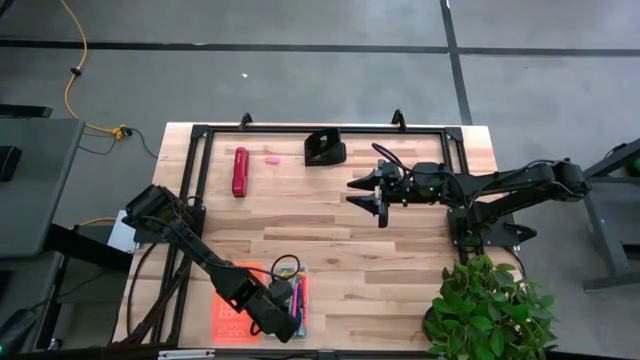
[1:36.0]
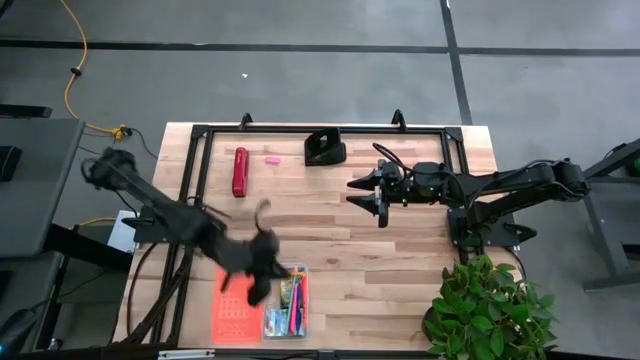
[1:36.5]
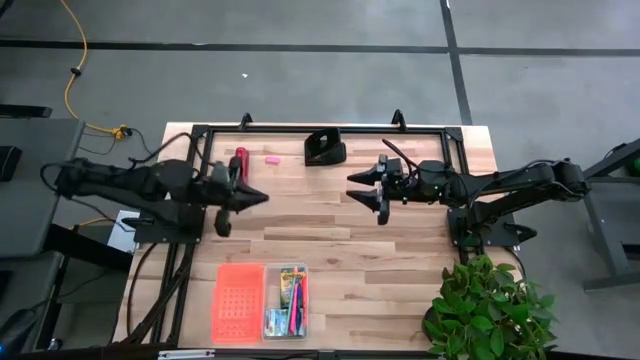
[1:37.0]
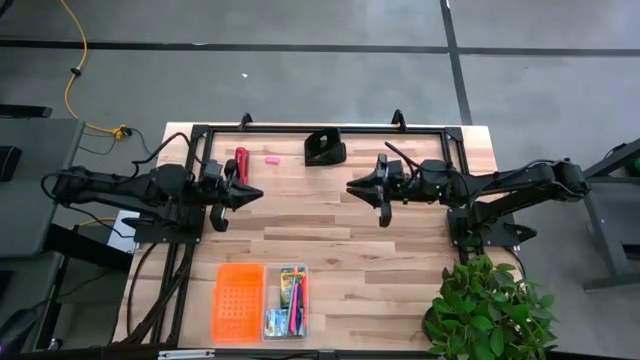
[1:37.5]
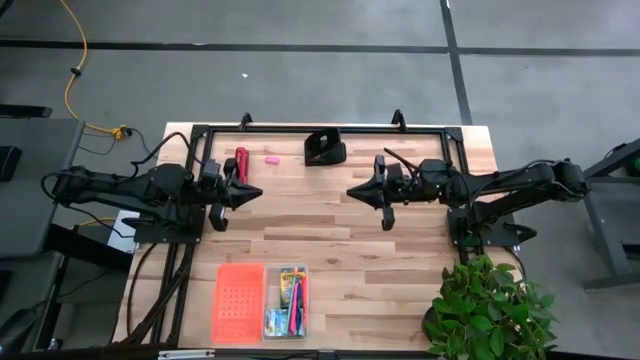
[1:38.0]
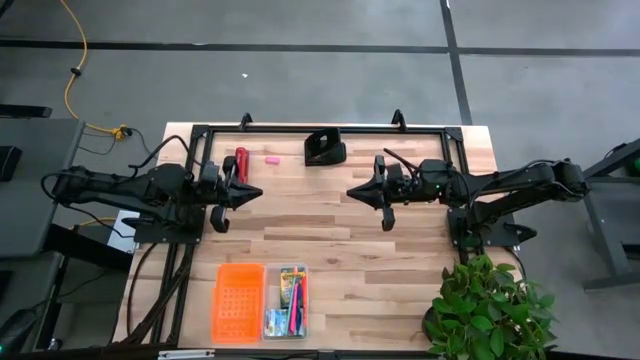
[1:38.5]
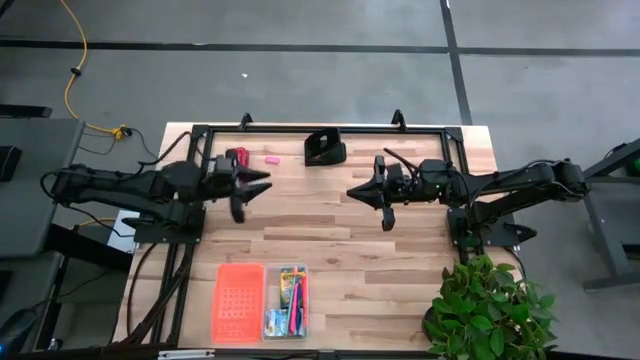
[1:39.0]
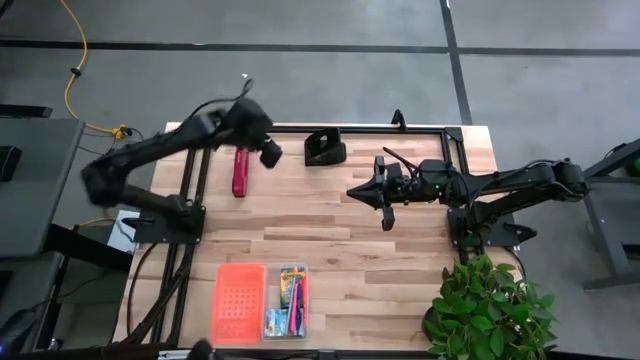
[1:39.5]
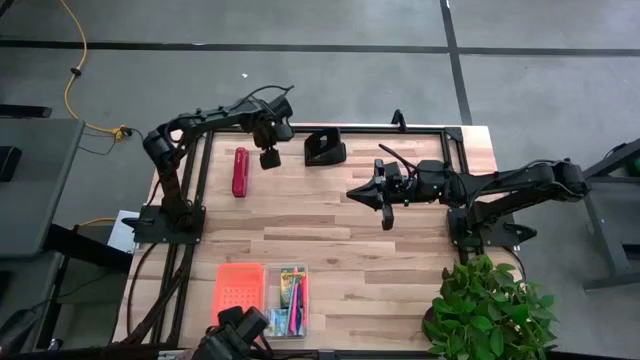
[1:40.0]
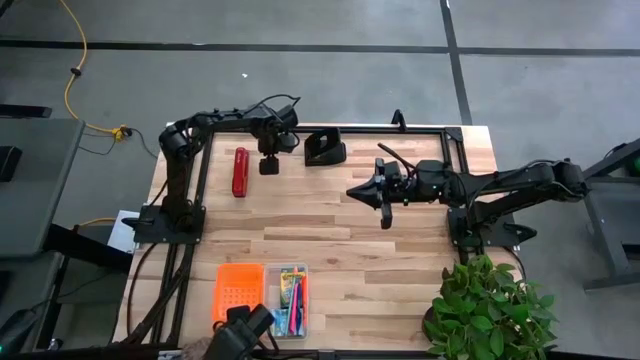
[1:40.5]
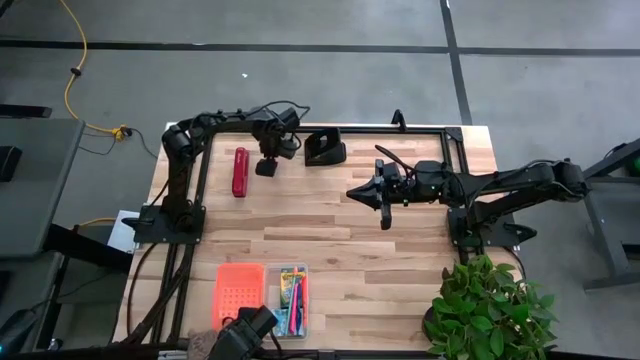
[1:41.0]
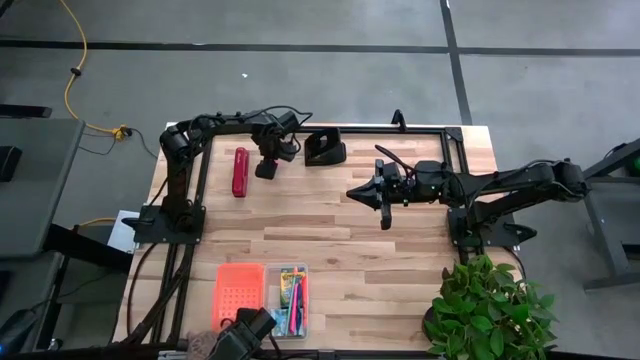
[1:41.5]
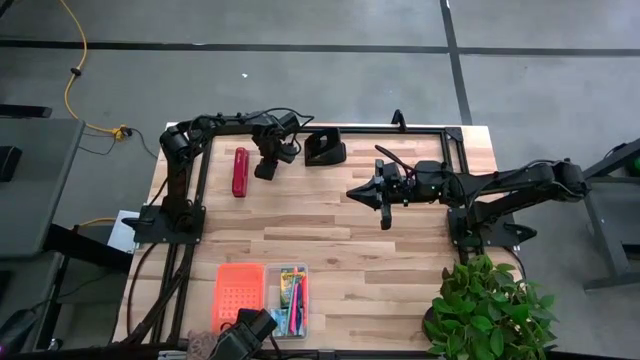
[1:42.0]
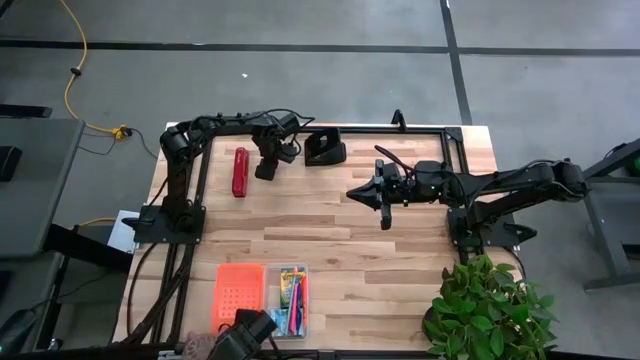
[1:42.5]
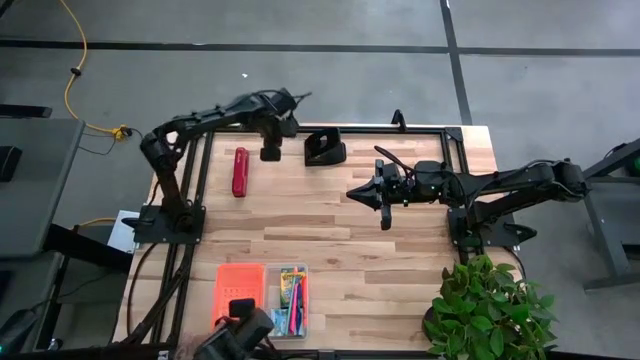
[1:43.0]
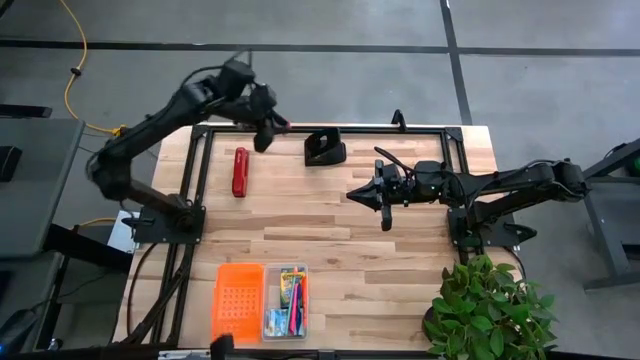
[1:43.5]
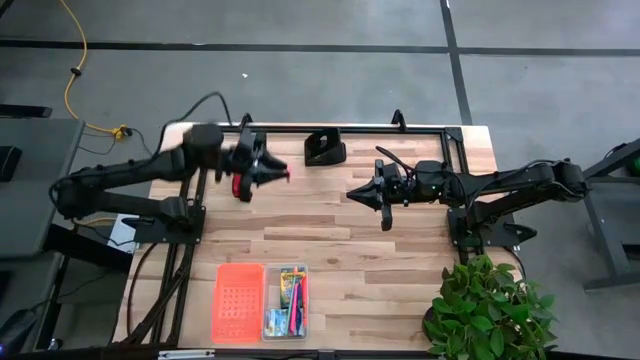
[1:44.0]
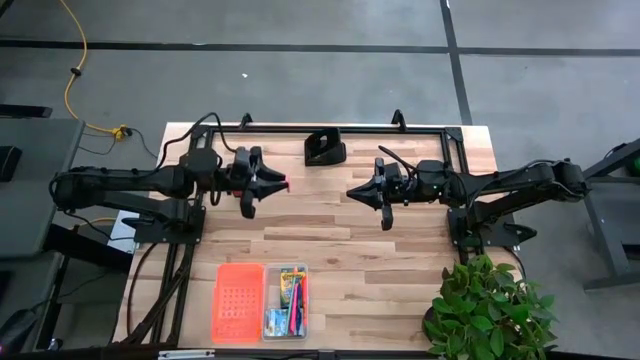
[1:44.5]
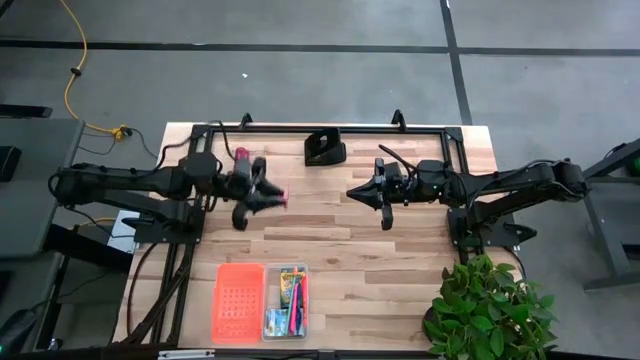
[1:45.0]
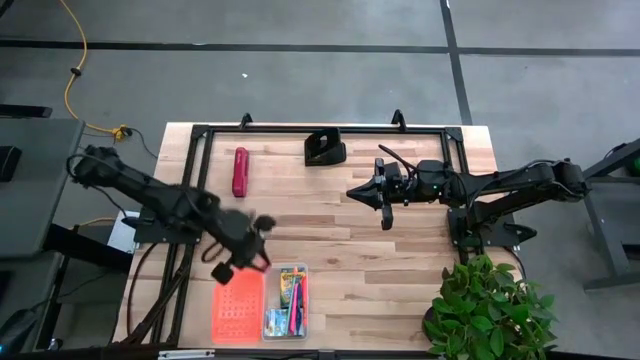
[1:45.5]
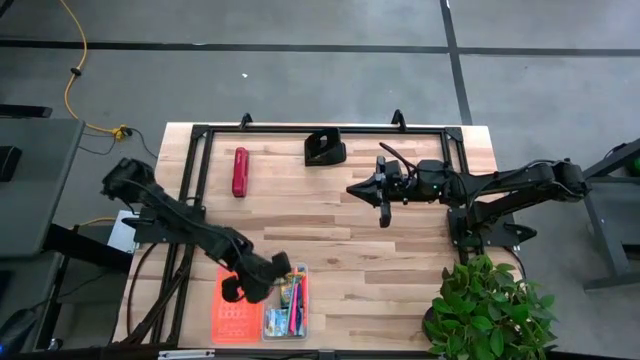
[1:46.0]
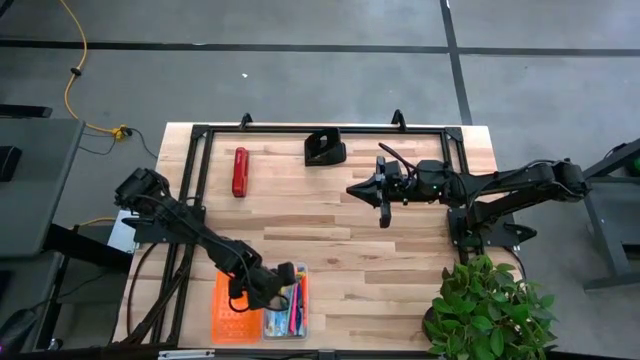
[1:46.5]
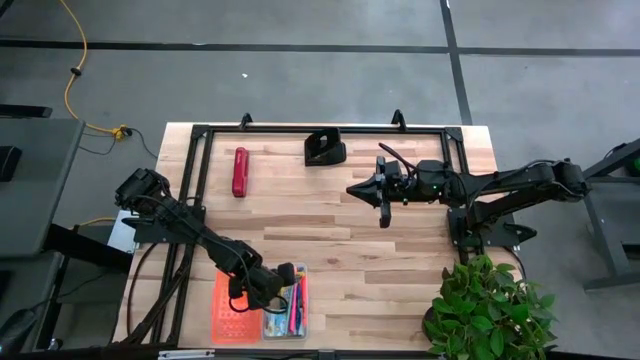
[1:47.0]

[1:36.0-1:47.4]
Task: Pack school essentials
Put the pink eraser into the supply box

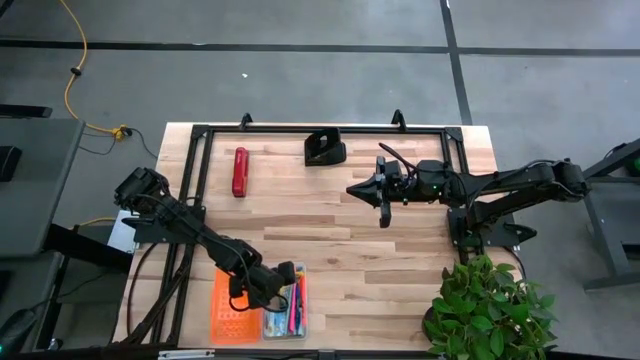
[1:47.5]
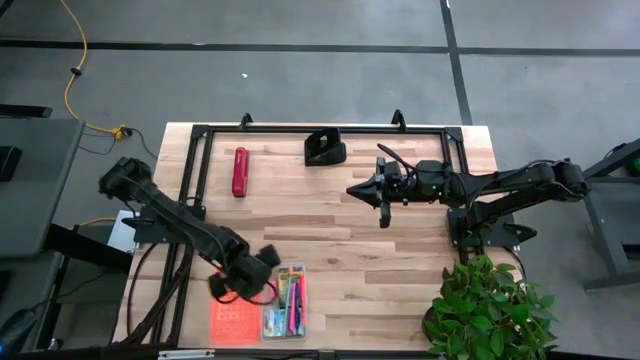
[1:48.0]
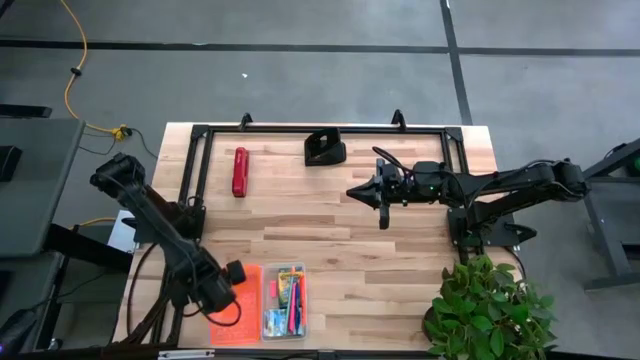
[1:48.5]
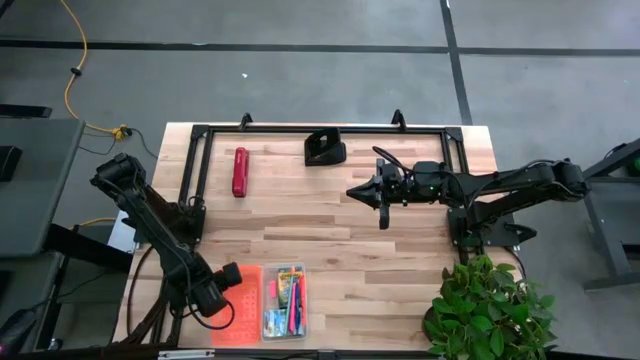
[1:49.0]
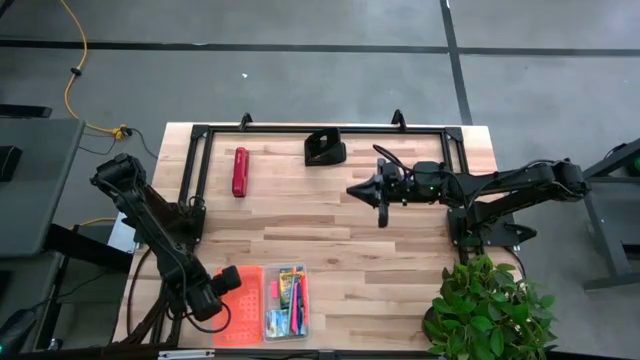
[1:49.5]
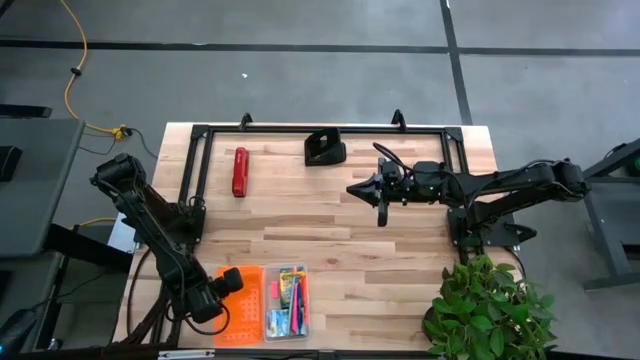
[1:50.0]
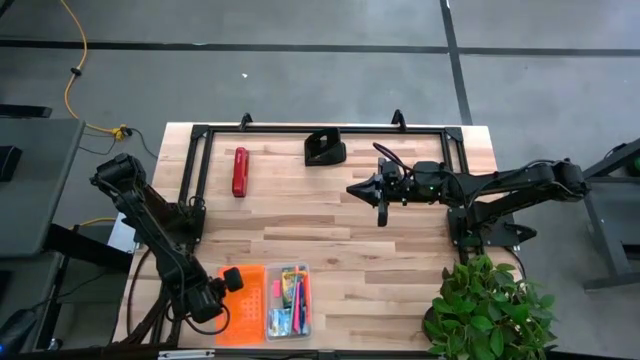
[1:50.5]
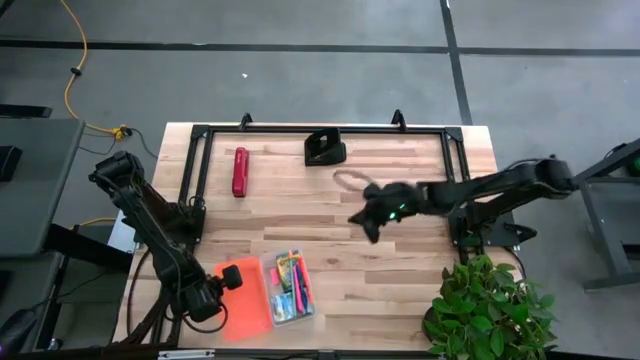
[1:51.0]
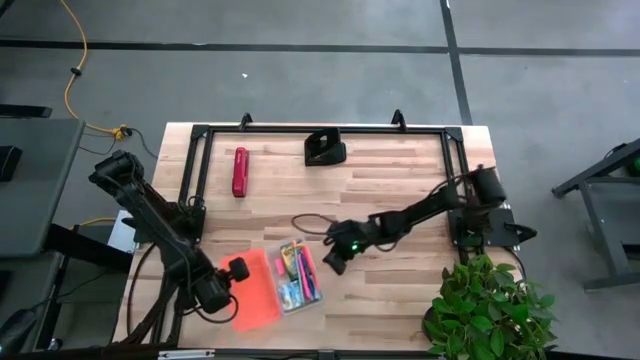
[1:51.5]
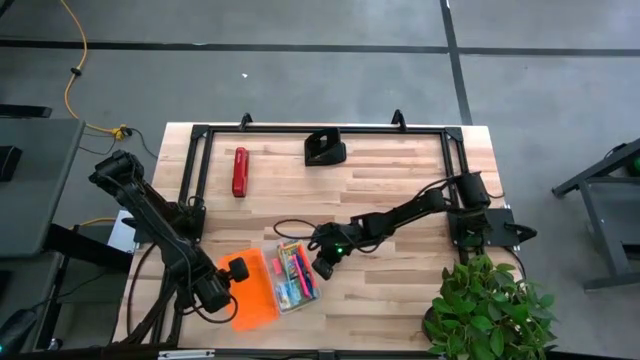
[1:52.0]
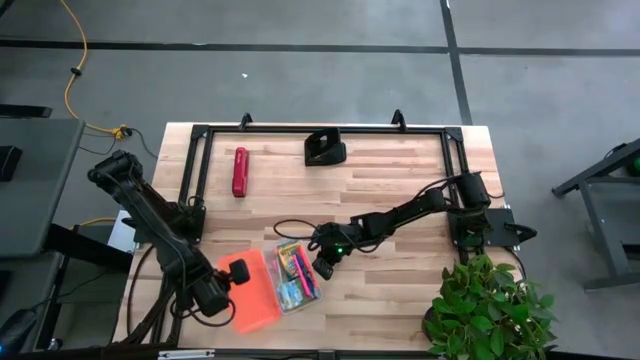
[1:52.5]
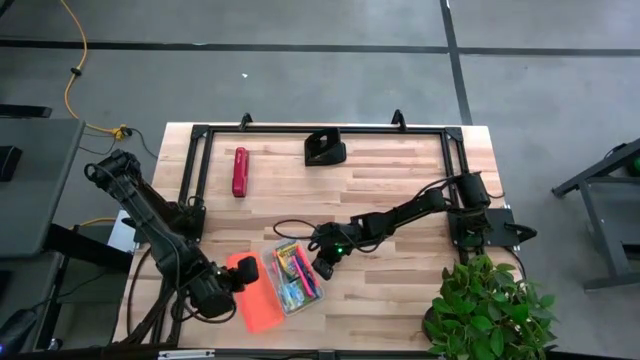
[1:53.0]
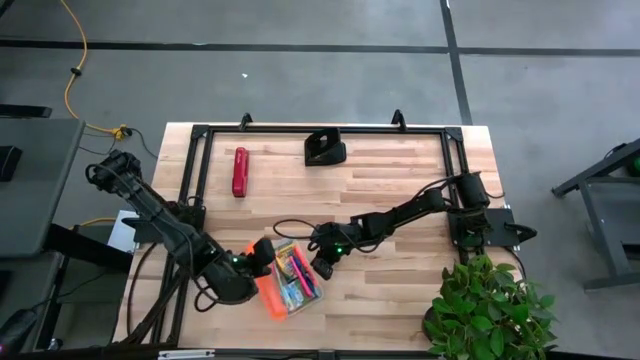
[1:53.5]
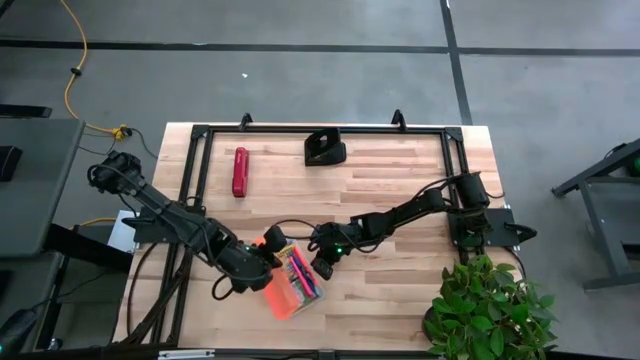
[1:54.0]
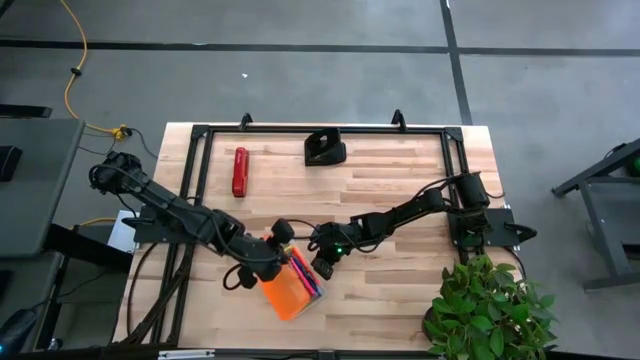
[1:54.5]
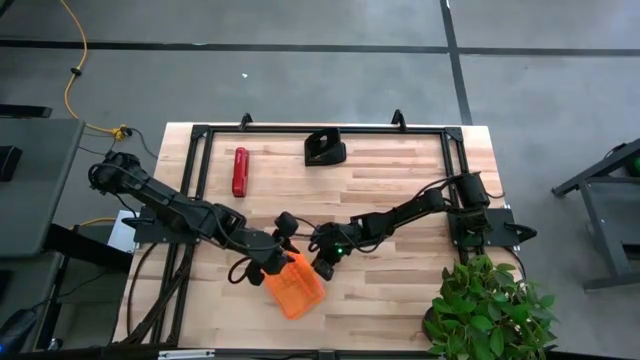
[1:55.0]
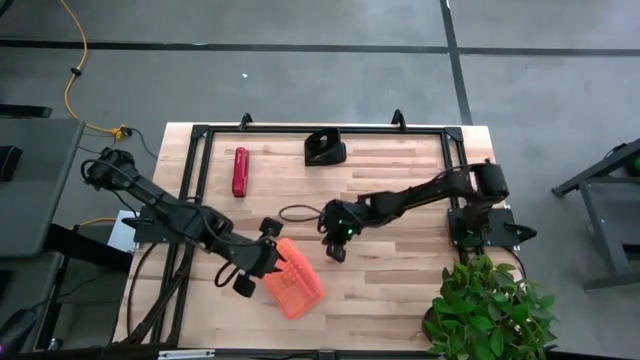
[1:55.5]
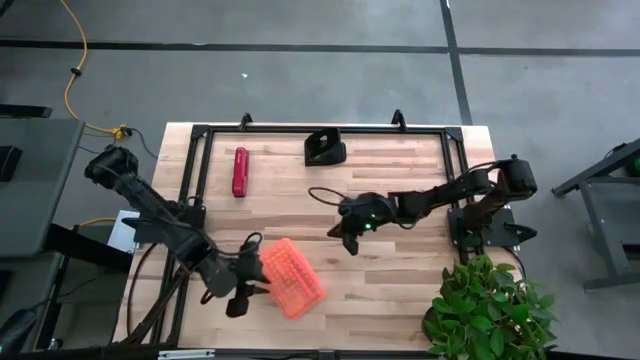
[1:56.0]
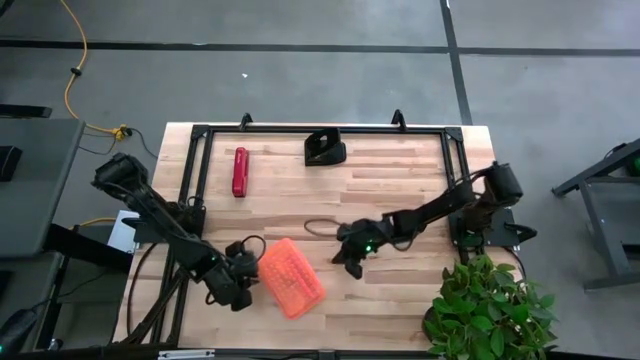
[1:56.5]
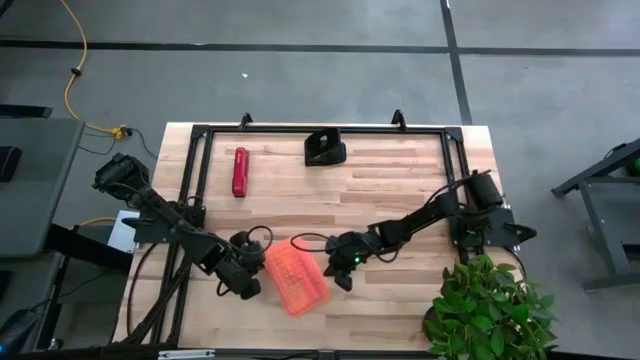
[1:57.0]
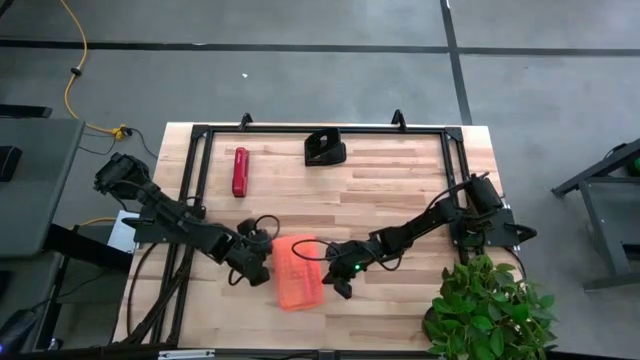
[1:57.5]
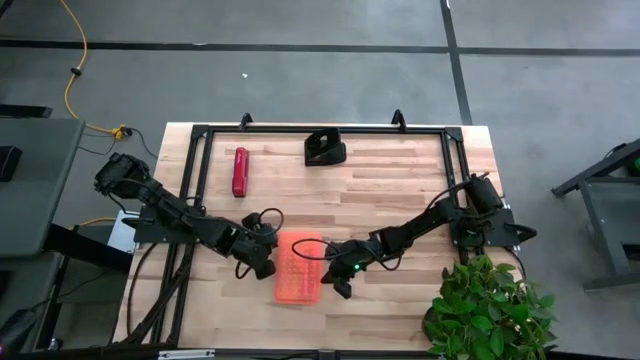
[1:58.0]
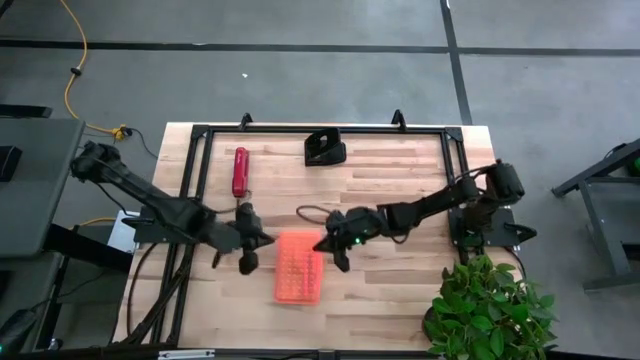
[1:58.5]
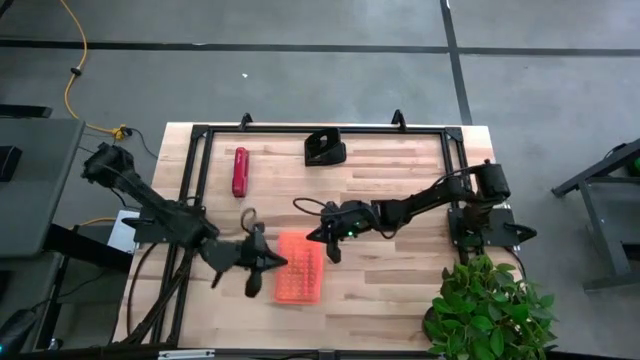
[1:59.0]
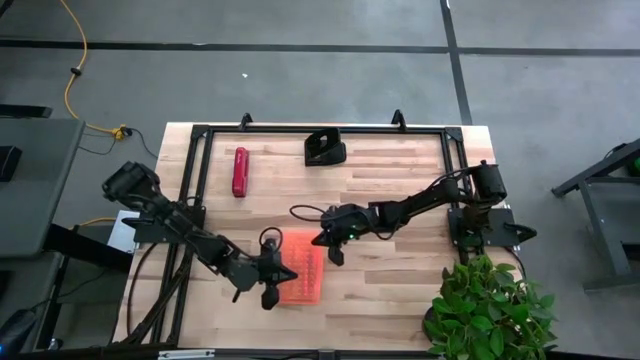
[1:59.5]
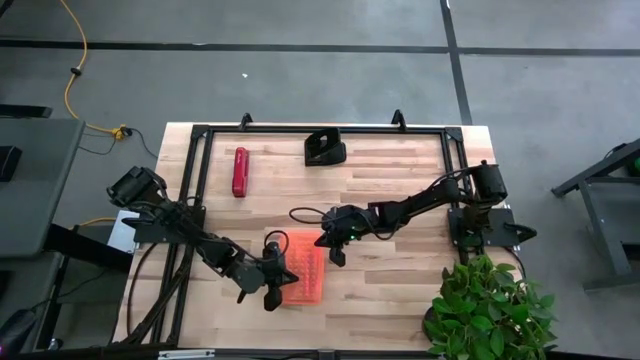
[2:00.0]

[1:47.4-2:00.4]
Close the supply box
